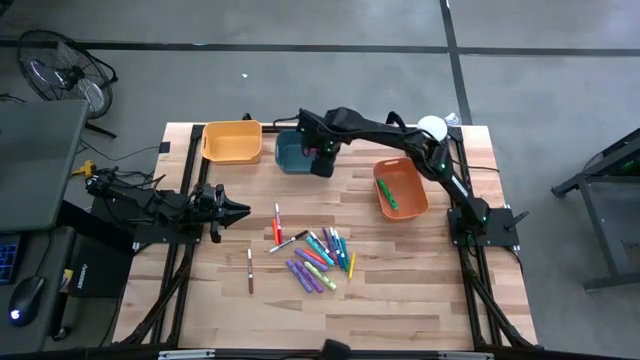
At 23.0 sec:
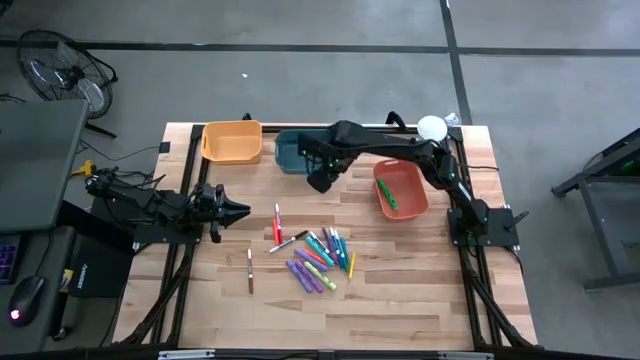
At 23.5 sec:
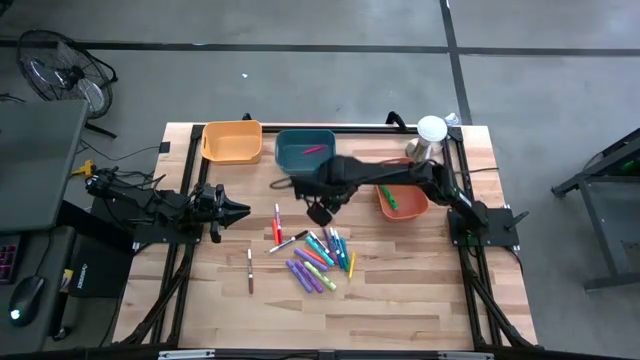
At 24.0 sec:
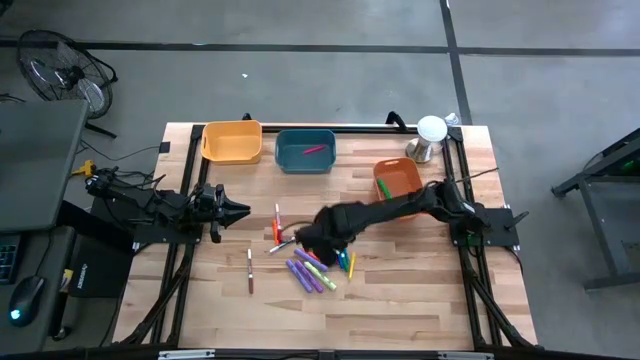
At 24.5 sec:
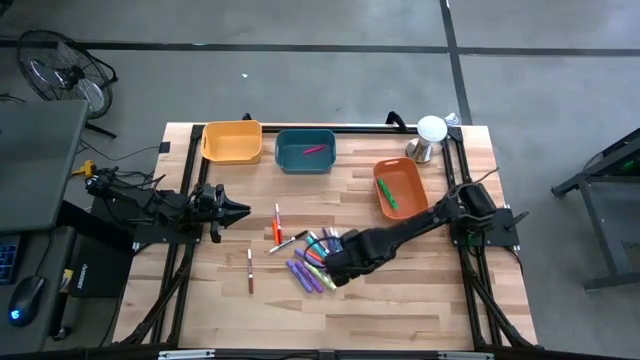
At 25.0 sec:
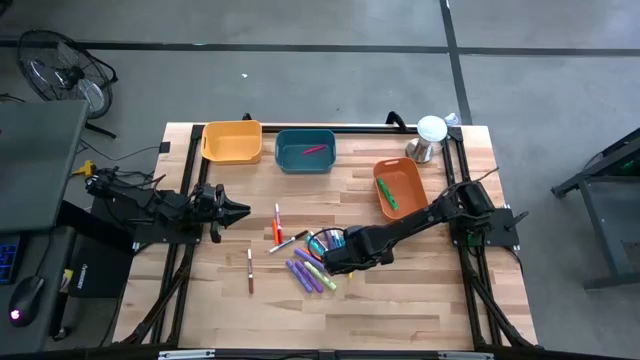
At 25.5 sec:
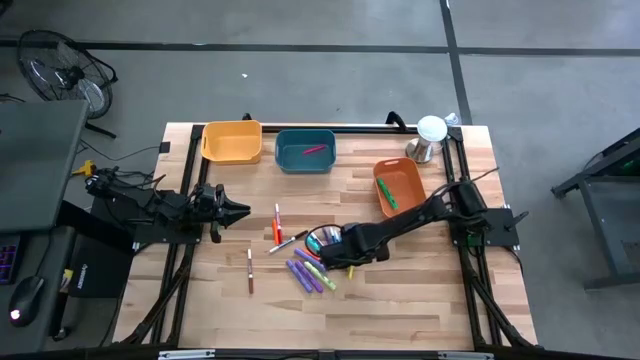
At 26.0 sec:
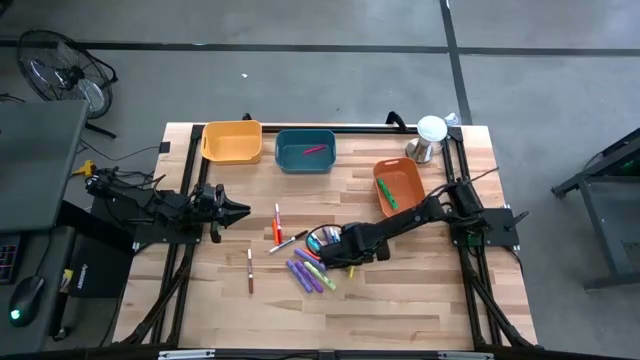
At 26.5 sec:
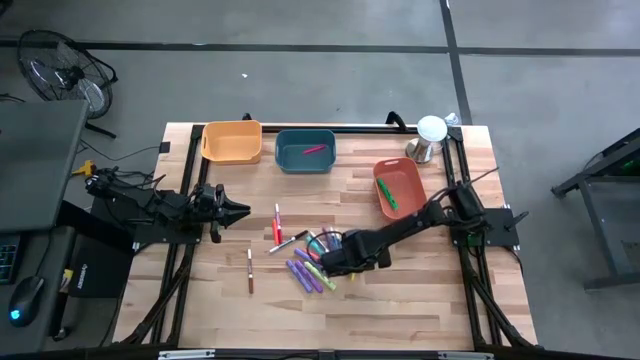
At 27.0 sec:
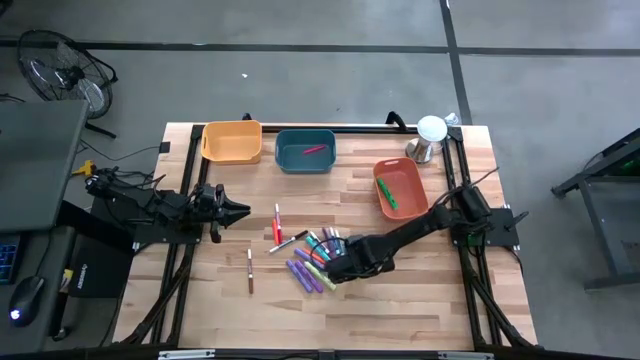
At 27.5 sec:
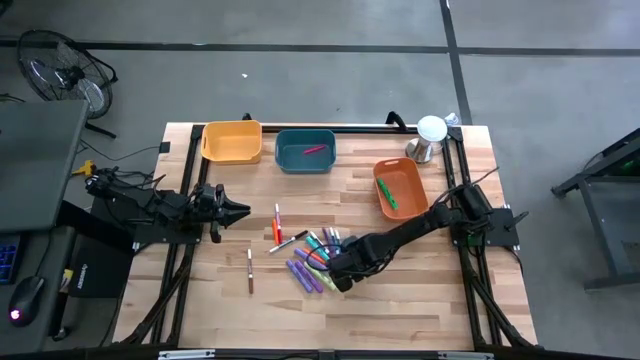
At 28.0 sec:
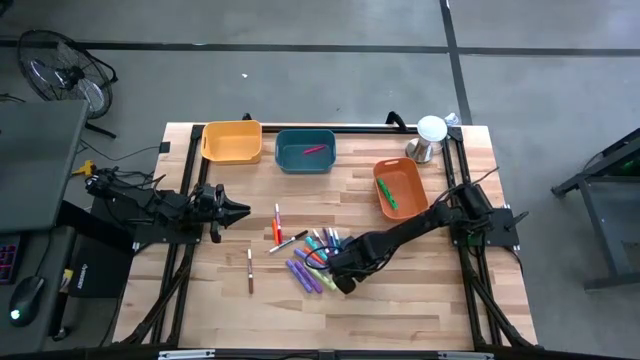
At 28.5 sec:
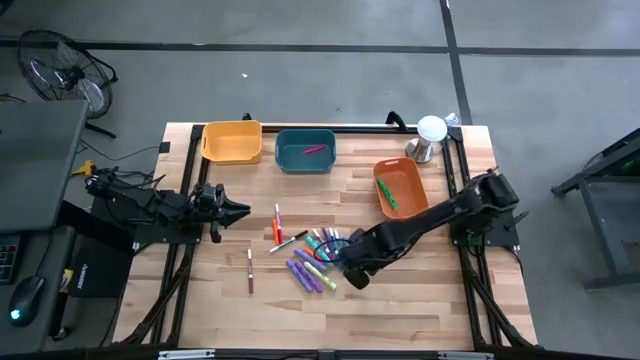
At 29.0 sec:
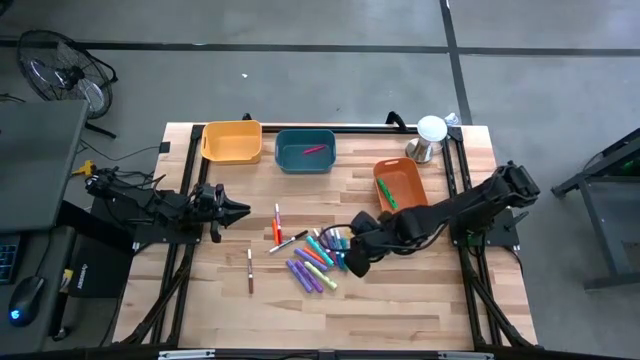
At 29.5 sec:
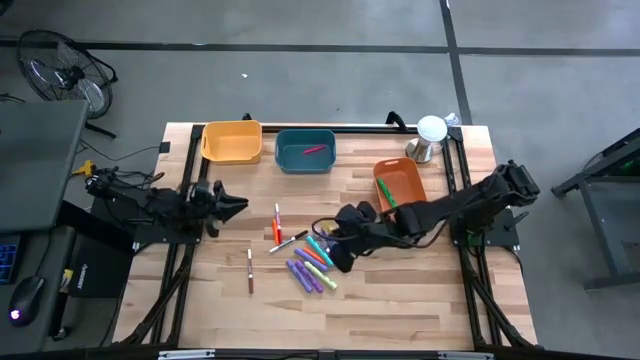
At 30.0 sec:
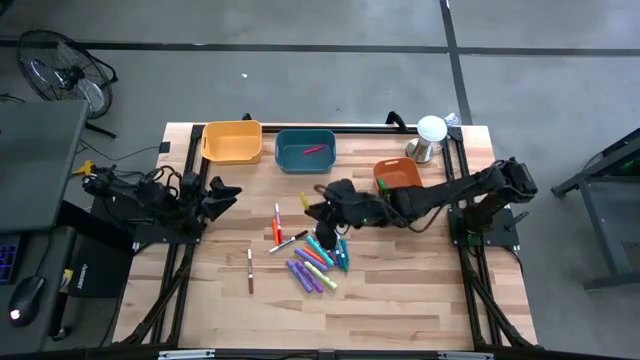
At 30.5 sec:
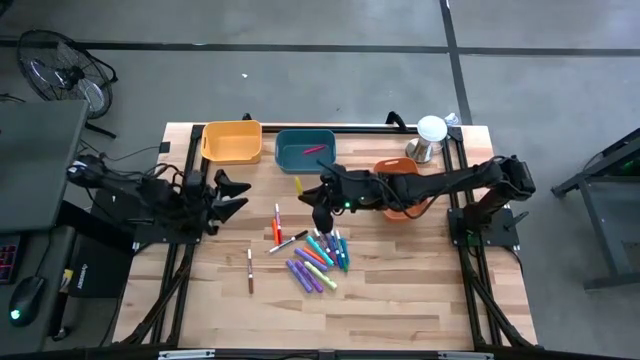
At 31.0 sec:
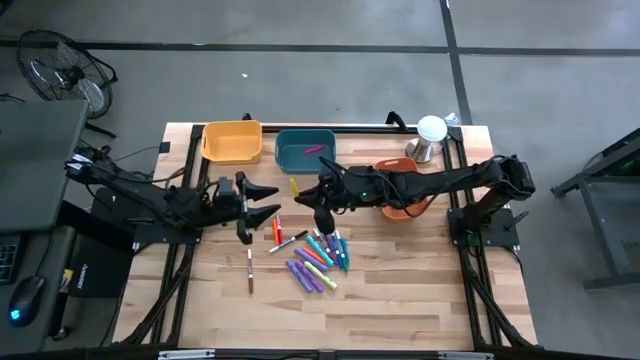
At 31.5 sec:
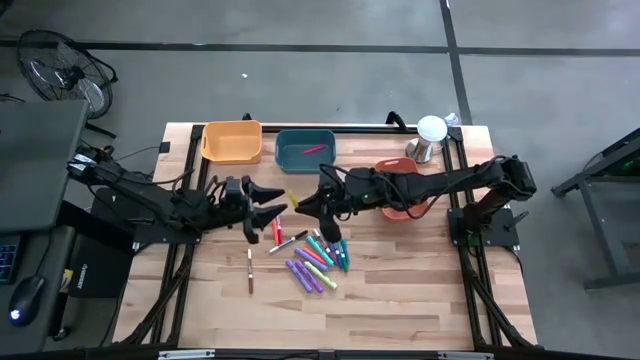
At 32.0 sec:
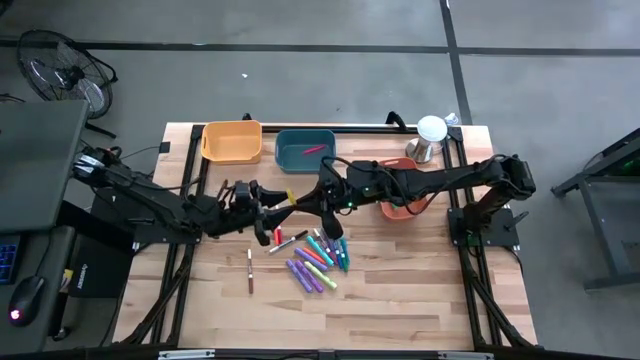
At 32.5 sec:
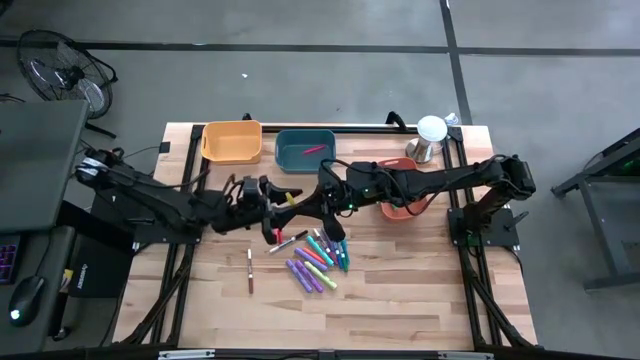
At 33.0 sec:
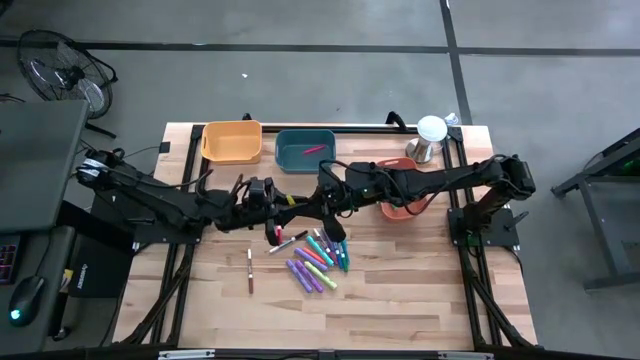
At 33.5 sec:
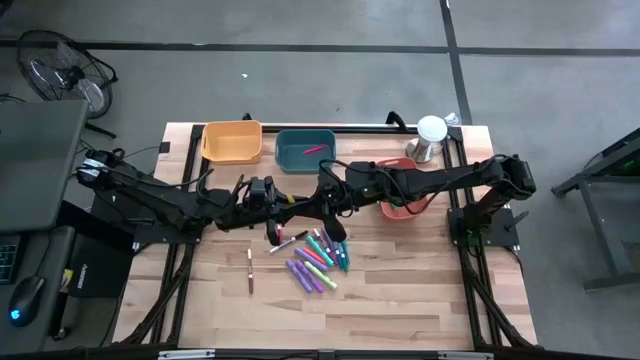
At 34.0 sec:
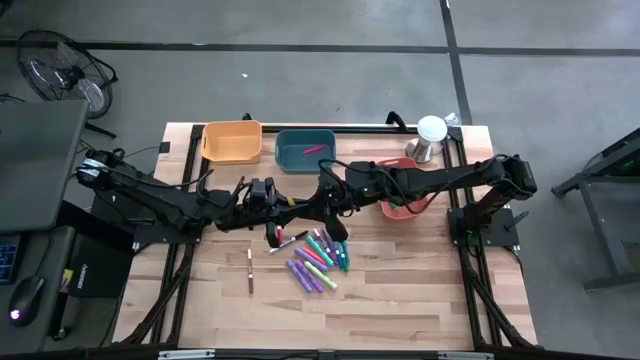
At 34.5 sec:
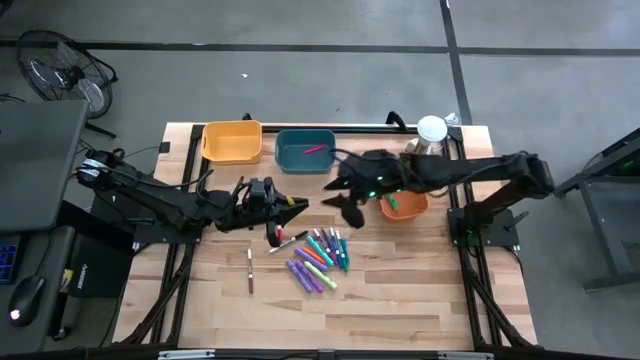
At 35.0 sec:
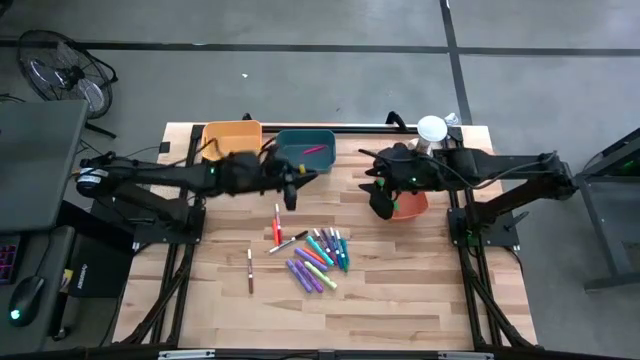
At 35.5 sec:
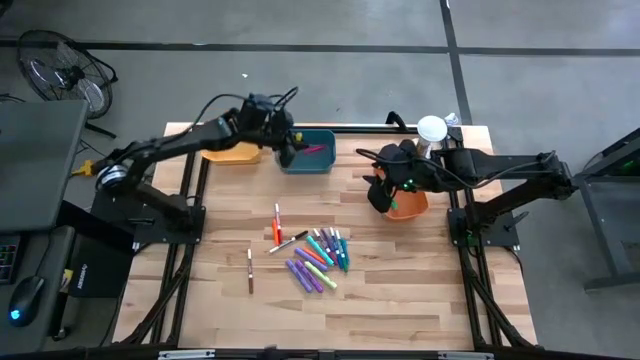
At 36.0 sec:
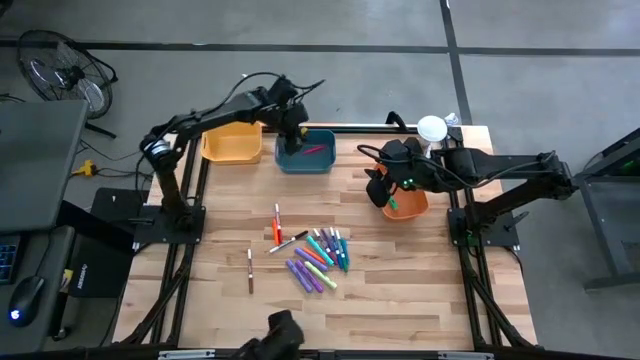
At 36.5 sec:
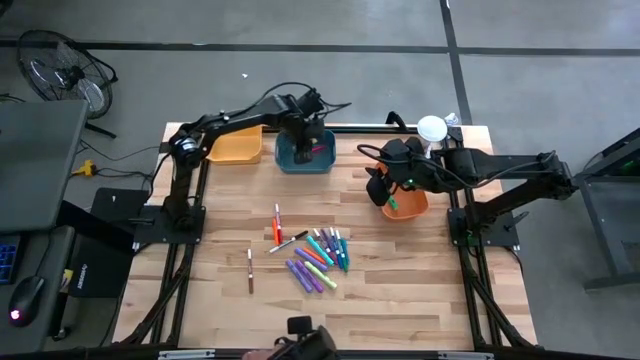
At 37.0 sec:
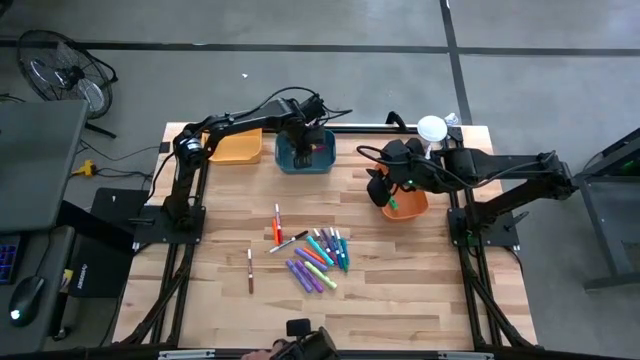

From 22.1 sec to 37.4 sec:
Task: Pick & Place Markers
Put the yellow pen into the blue bin
